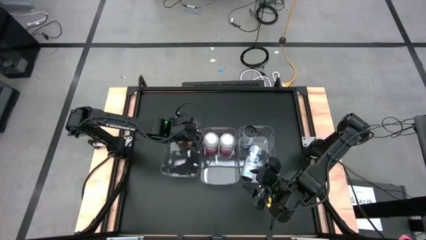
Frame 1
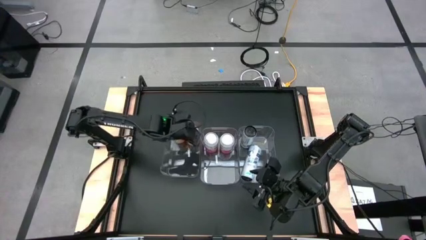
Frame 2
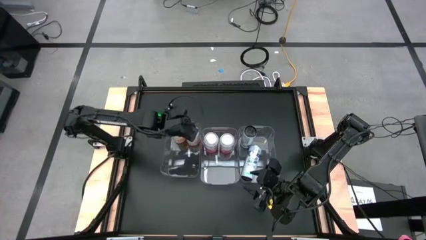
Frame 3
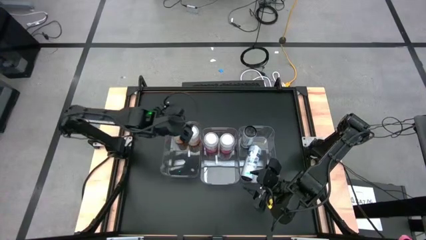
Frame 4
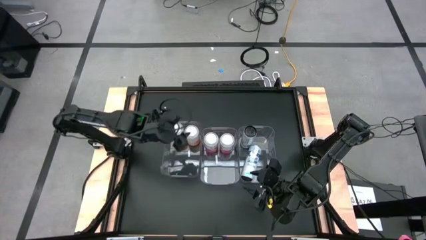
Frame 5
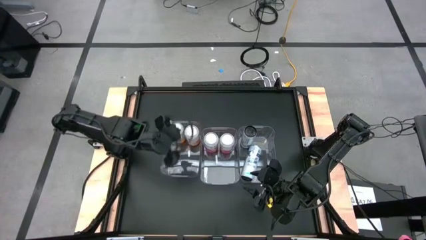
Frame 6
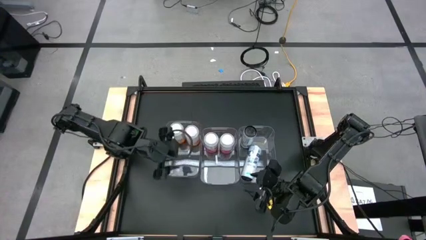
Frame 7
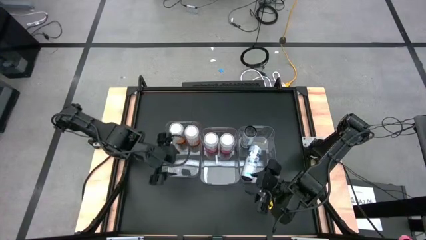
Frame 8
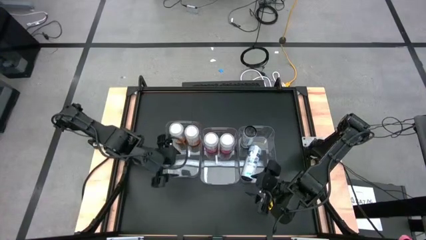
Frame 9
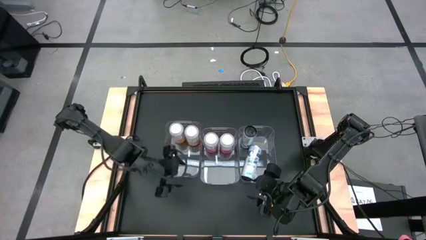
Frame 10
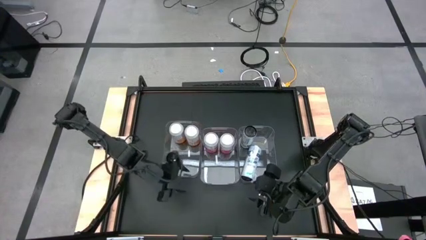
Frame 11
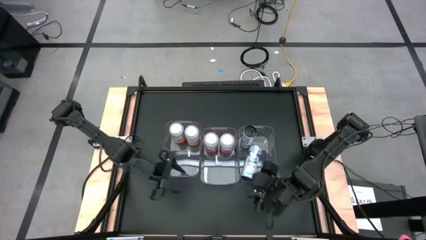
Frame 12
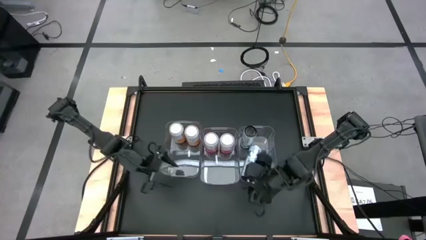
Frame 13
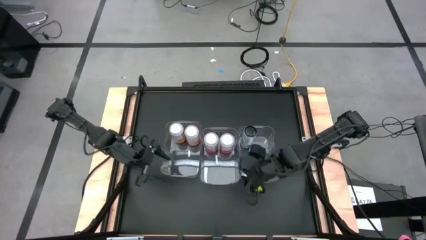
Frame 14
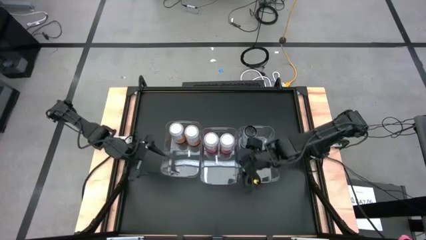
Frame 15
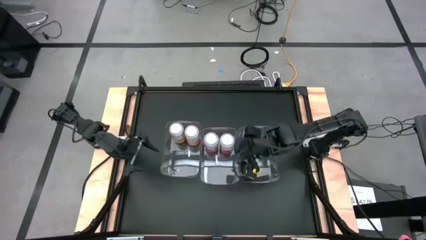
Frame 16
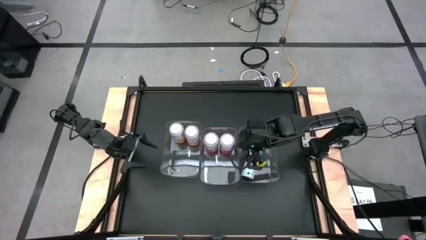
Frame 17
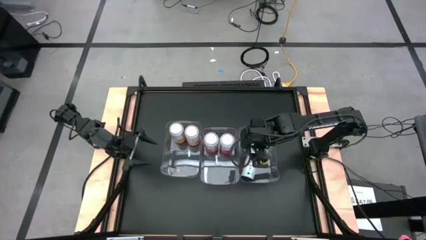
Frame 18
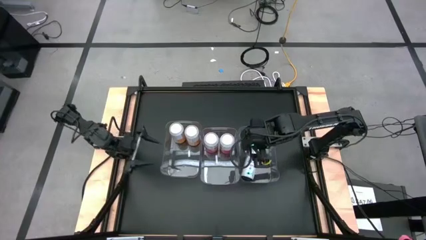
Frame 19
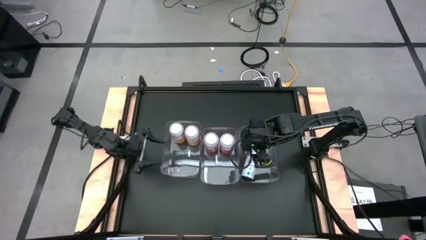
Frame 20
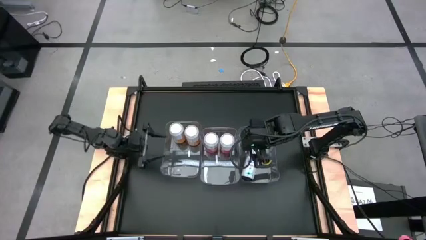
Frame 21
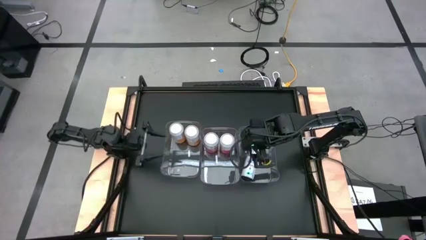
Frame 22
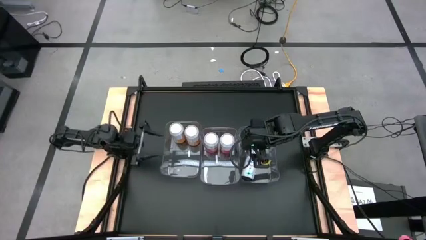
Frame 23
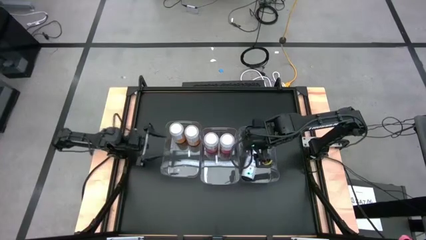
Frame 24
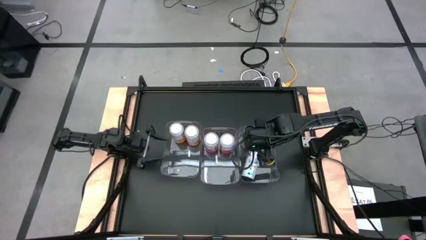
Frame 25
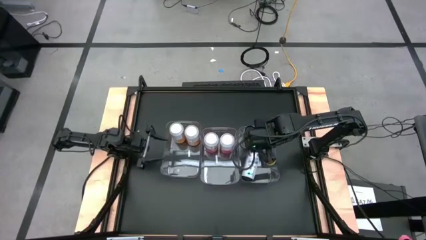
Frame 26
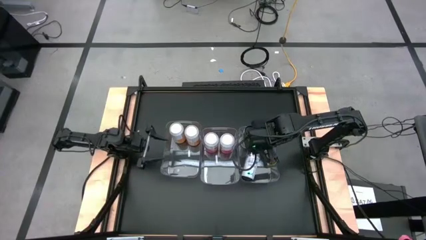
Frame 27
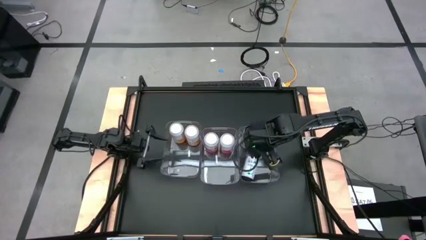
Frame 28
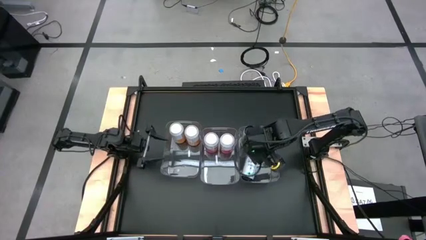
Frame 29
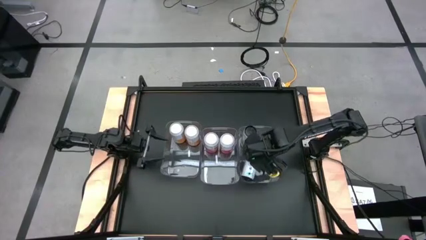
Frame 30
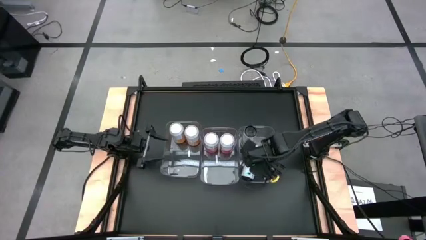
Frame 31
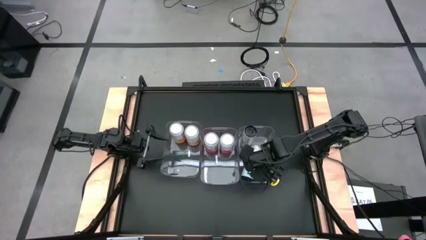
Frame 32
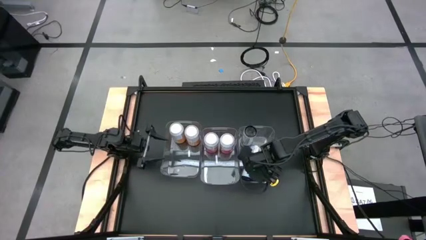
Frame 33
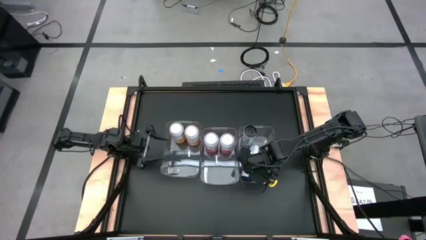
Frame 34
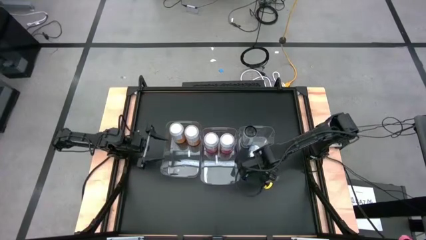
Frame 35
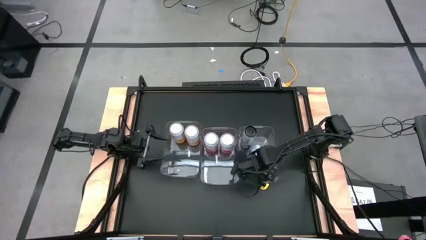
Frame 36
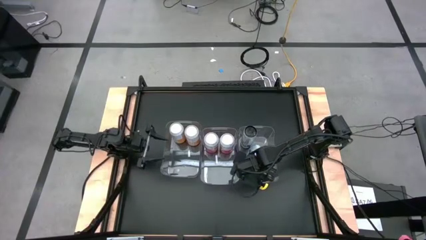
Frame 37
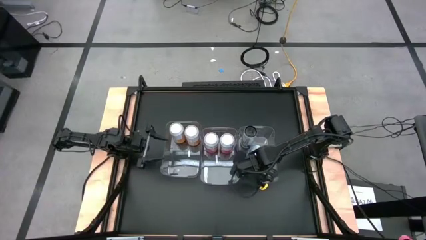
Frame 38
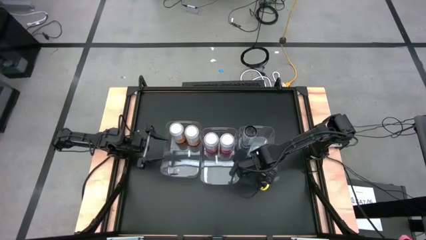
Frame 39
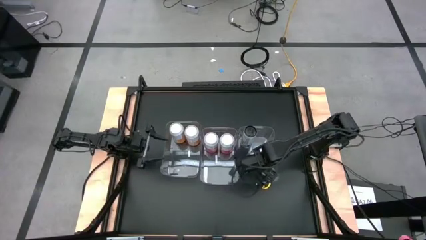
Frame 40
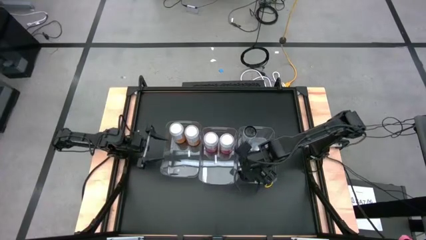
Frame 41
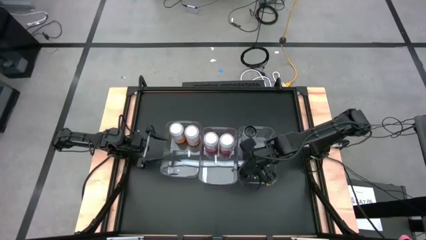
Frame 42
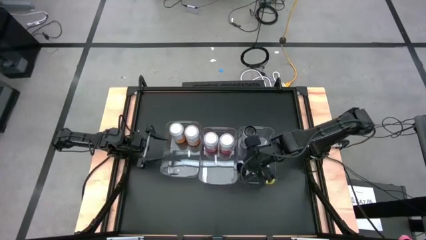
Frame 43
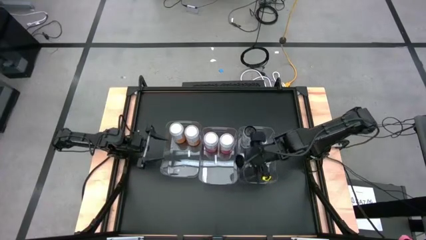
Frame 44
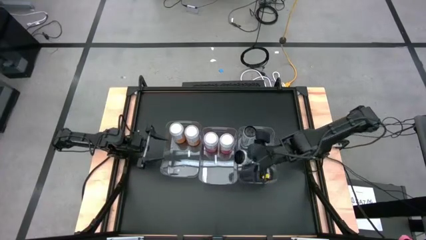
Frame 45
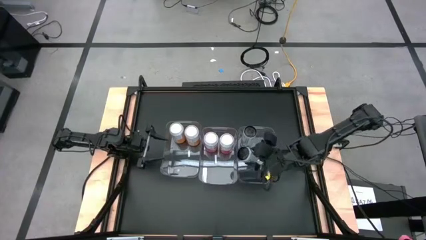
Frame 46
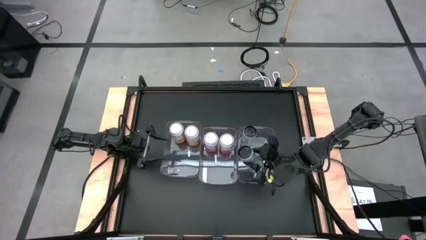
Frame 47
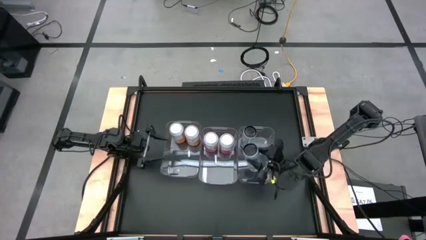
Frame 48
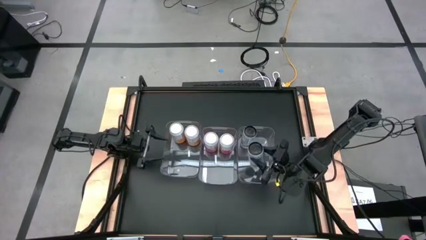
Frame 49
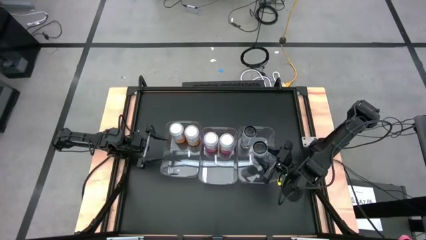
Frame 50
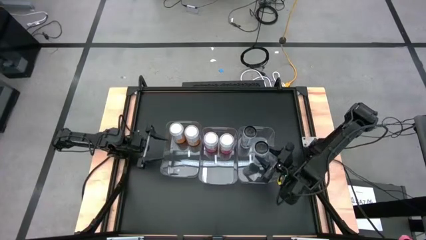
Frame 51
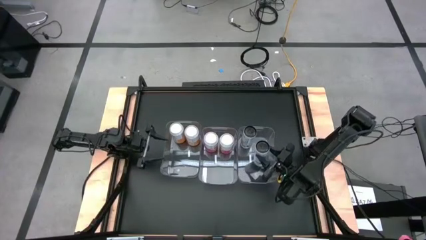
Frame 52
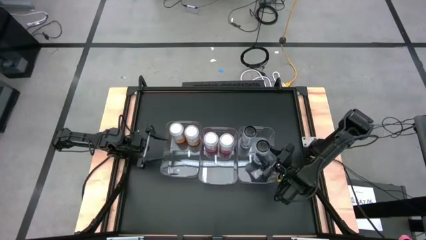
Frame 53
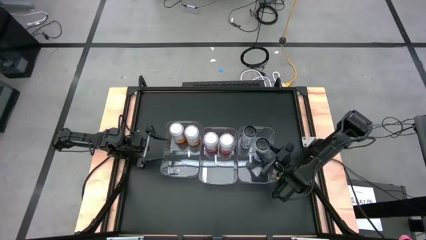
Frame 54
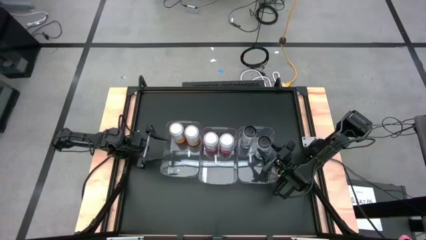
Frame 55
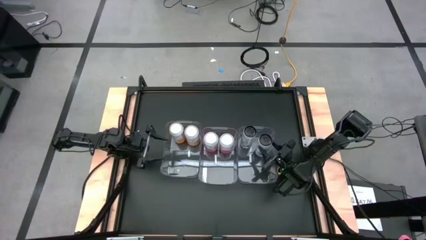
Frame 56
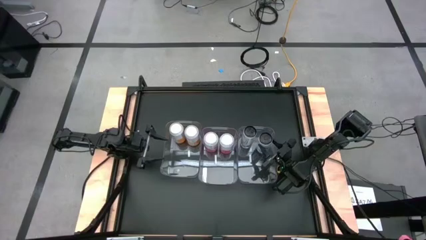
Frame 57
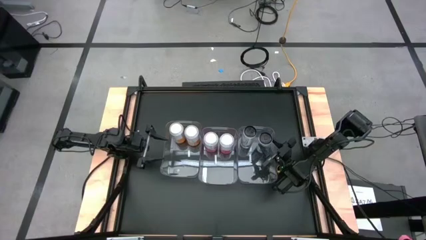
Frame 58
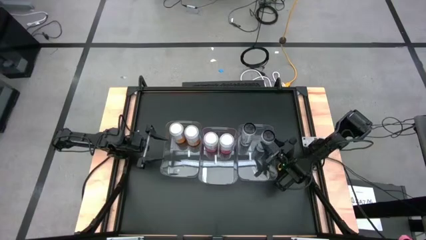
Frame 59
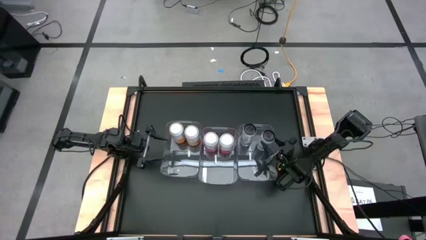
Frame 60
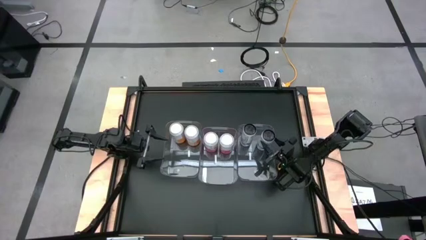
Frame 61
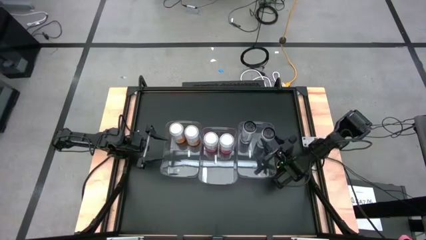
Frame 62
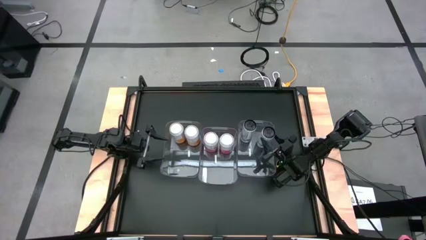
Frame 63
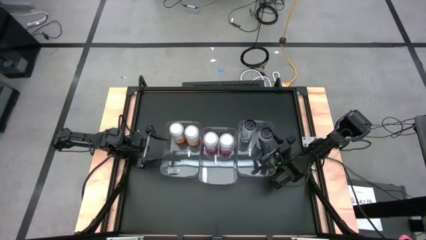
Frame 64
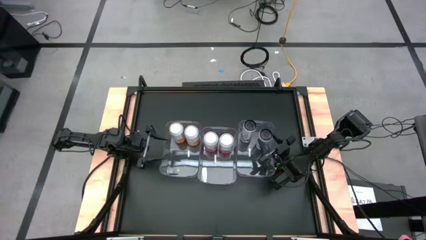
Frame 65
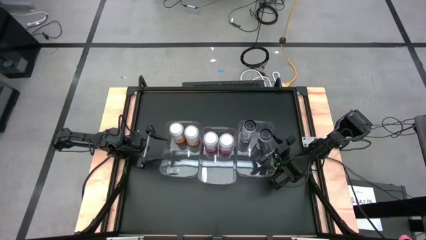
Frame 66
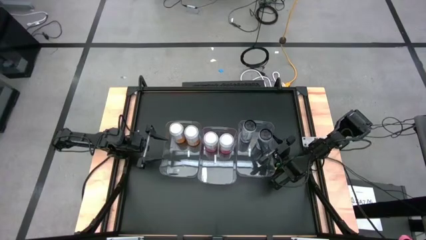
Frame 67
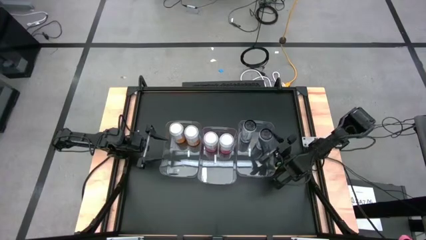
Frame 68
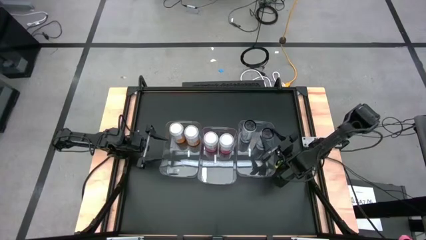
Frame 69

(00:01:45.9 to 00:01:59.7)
Task: Sort soda cans
Adjust the blue soda can
